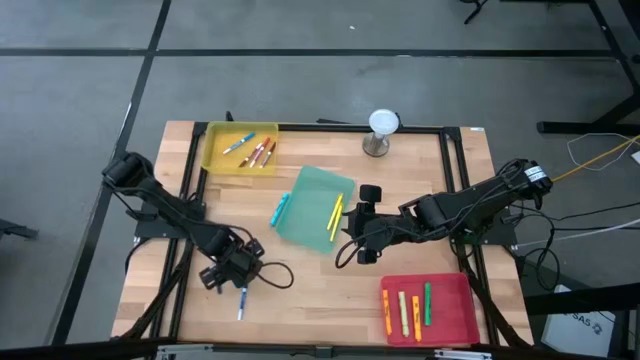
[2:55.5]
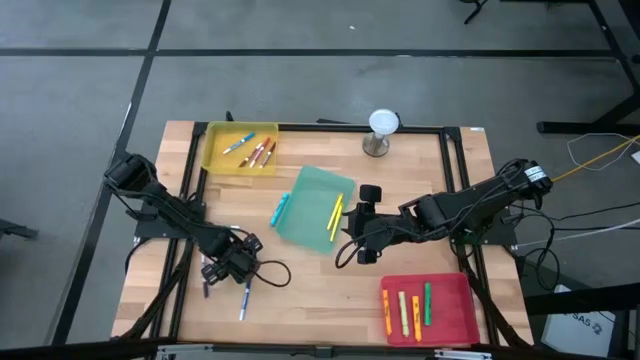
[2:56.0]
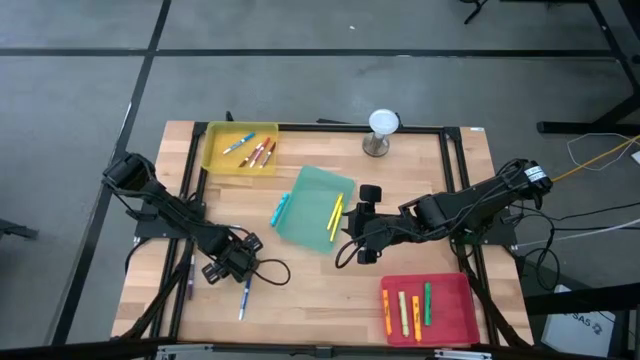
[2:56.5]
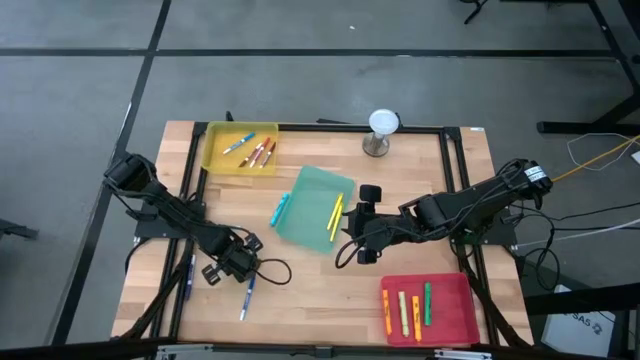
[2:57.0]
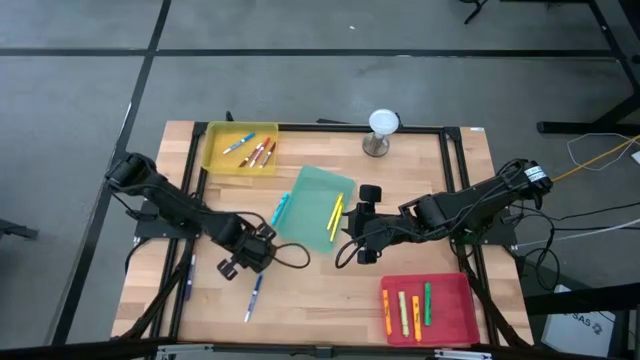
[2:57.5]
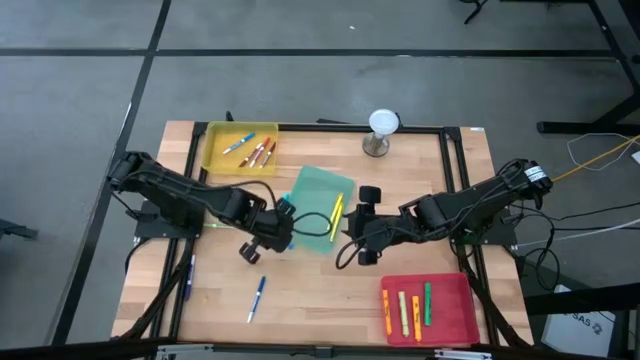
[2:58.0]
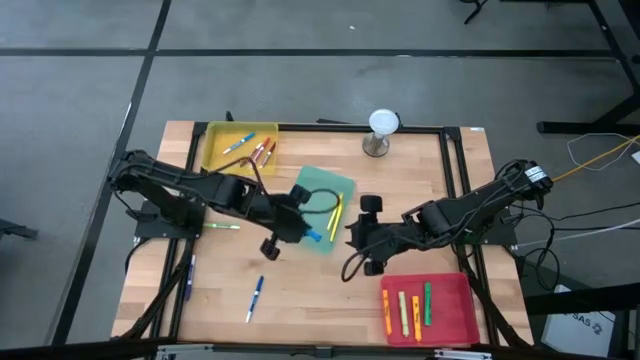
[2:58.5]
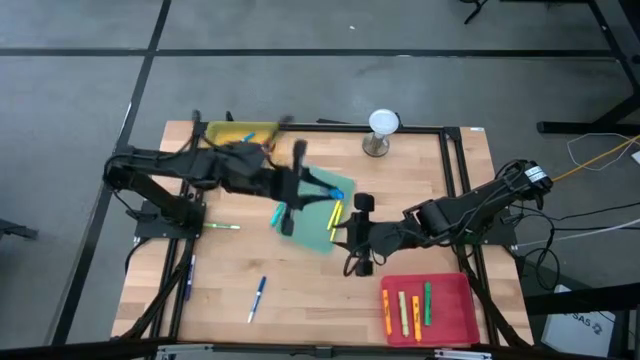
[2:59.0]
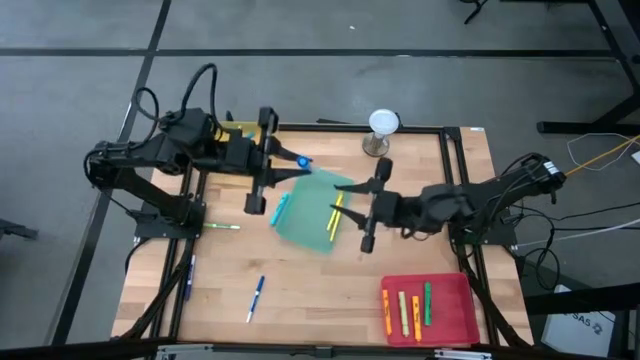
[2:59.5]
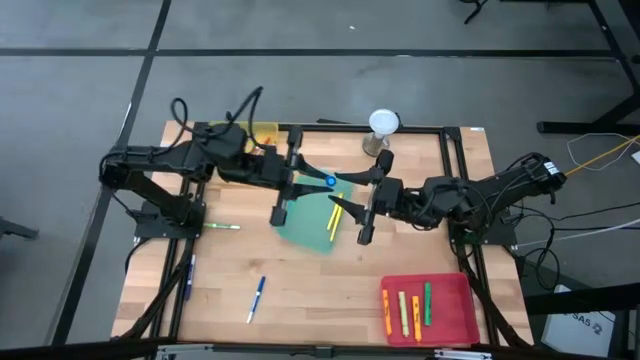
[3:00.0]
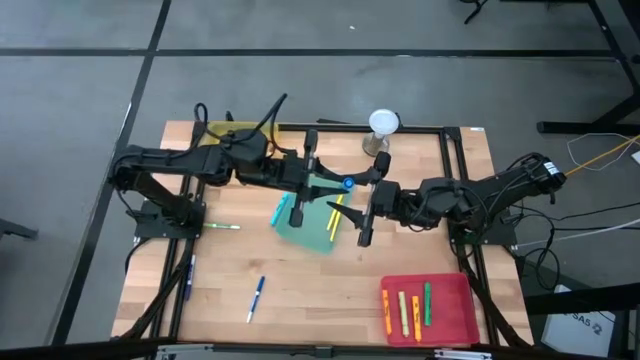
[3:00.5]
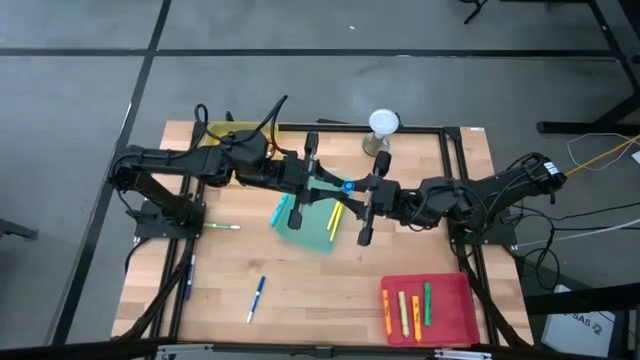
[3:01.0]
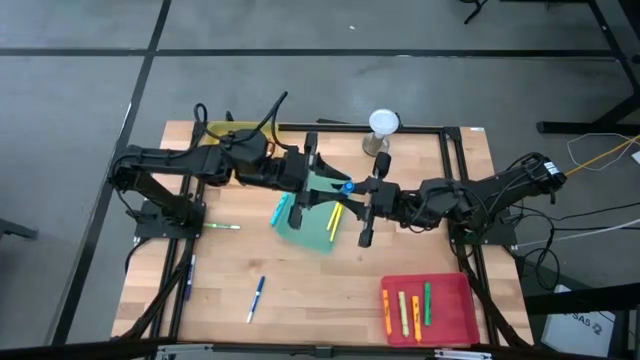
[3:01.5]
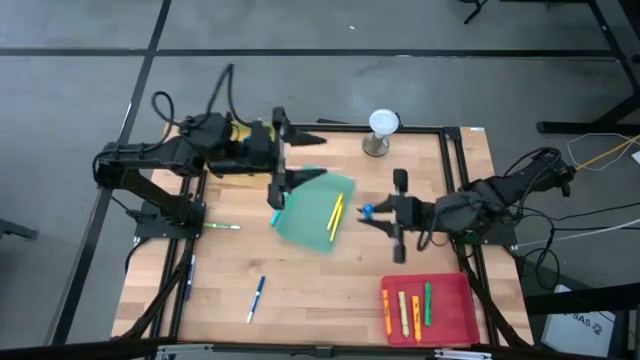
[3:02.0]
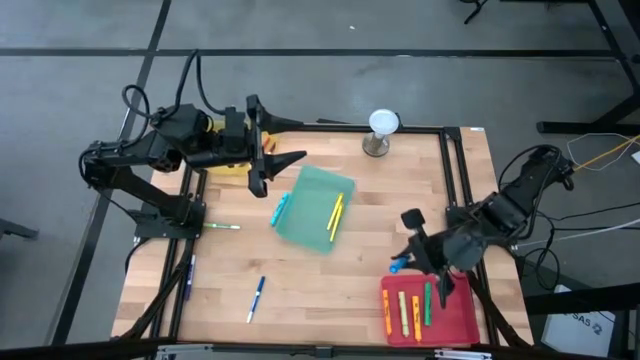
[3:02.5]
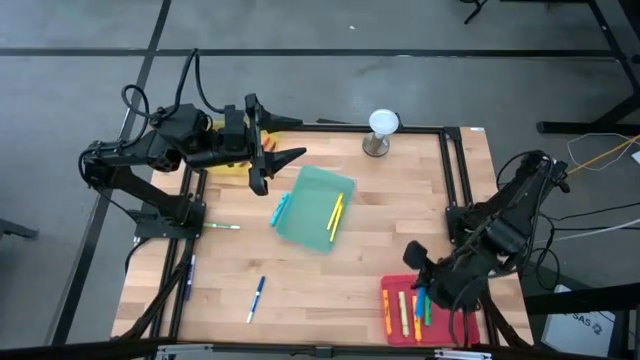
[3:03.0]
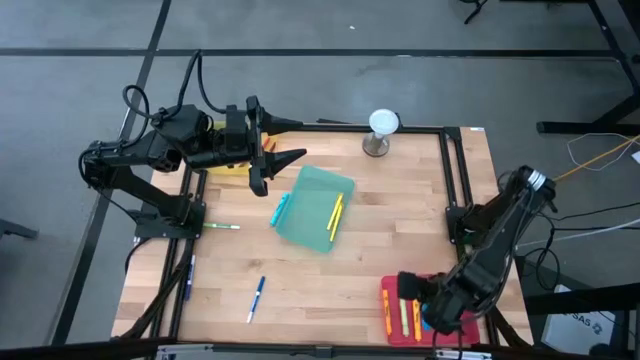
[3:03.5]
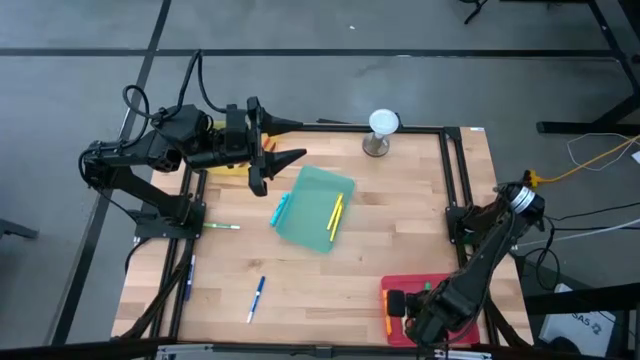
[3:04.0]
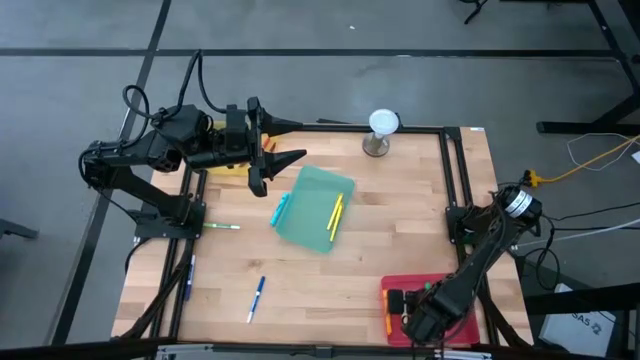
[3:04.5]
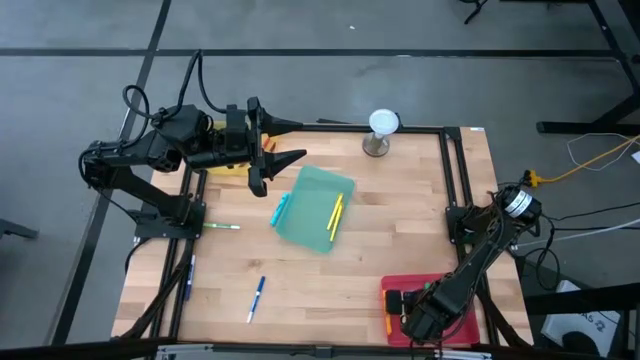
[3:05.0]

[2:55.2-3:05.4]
Task: Pick & Place Markers
Put the blue highlighter pen into the pink bin

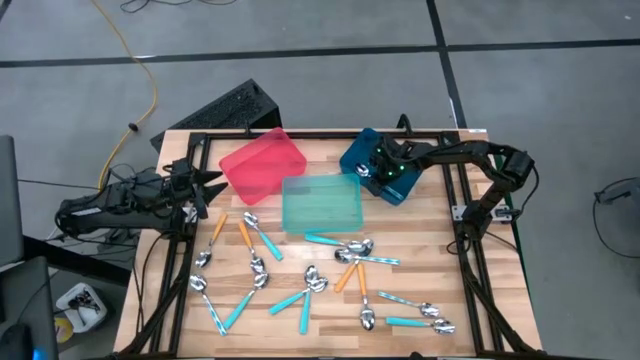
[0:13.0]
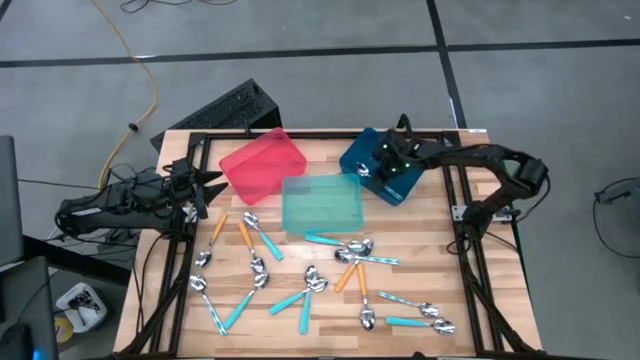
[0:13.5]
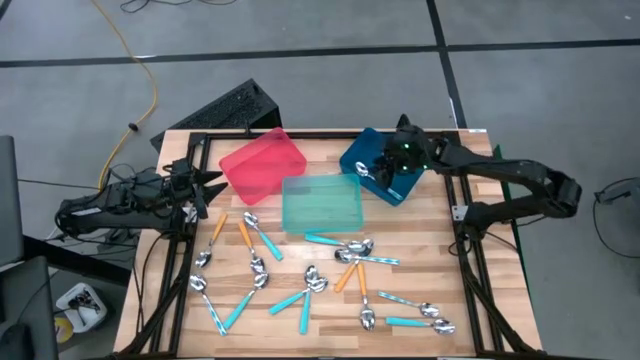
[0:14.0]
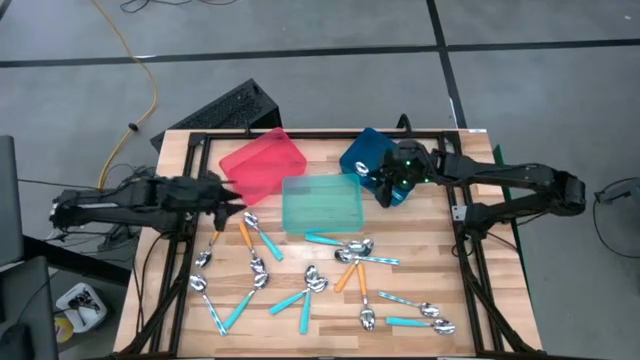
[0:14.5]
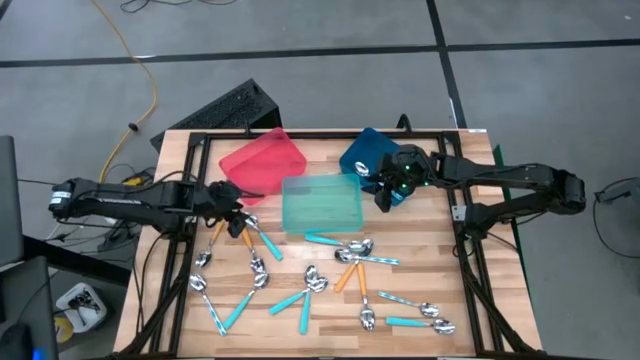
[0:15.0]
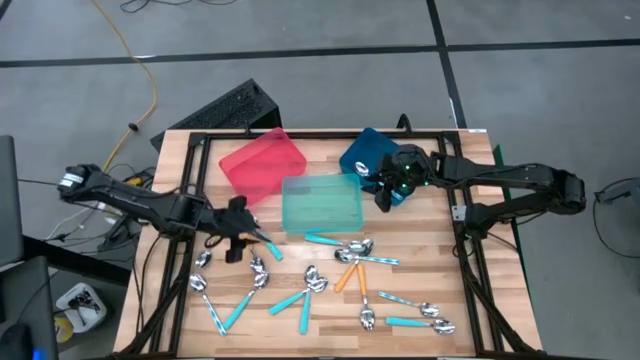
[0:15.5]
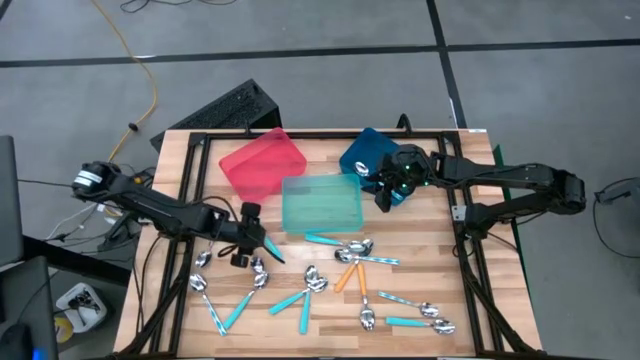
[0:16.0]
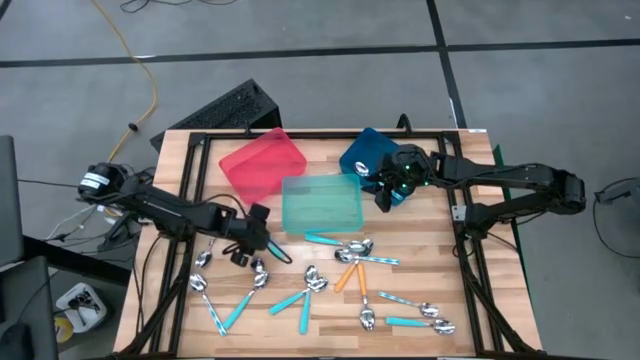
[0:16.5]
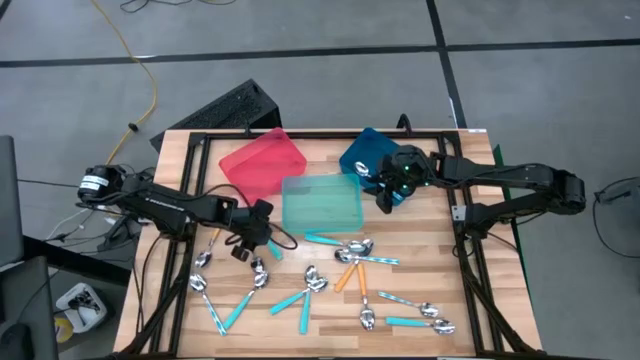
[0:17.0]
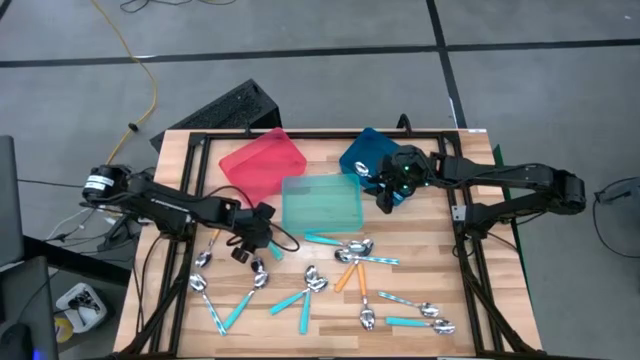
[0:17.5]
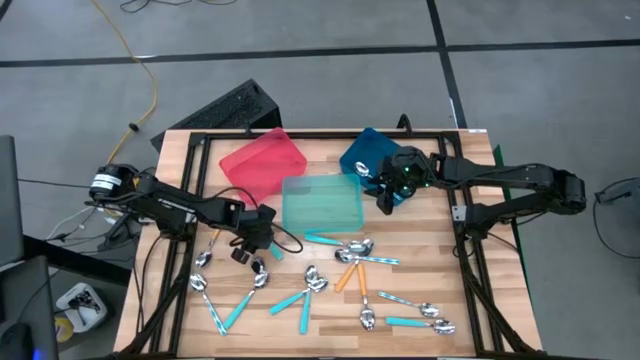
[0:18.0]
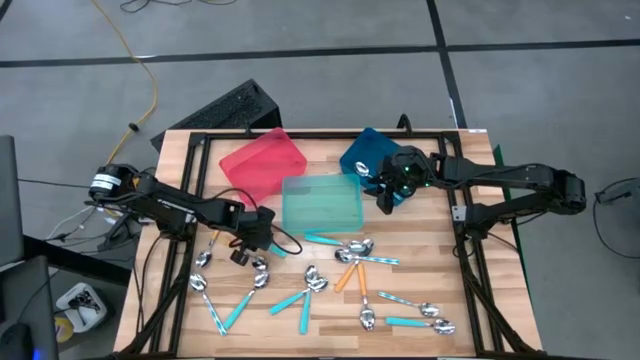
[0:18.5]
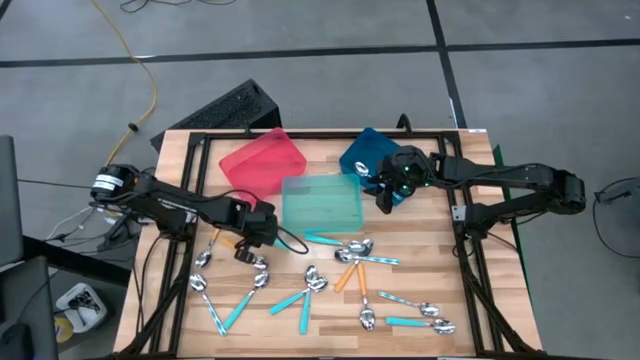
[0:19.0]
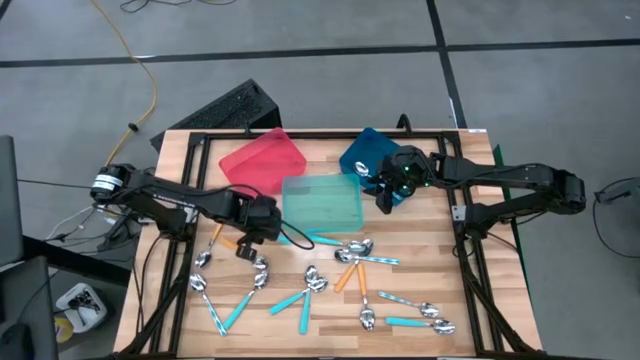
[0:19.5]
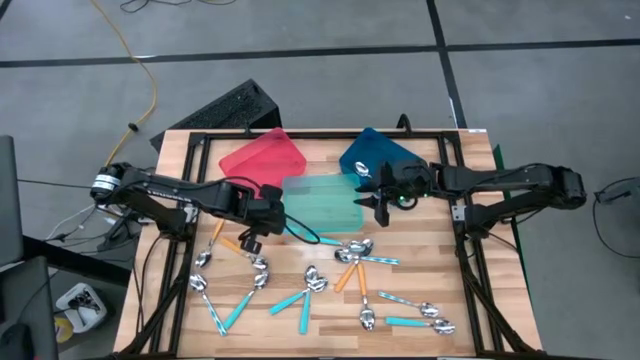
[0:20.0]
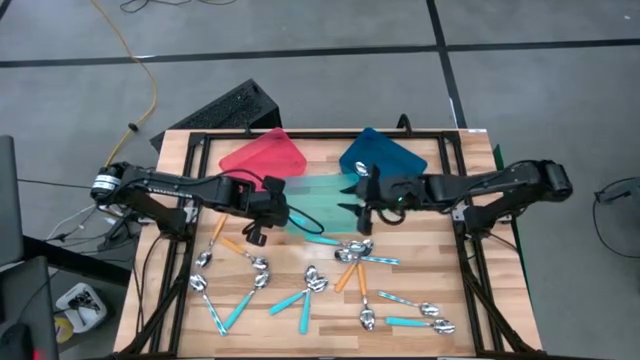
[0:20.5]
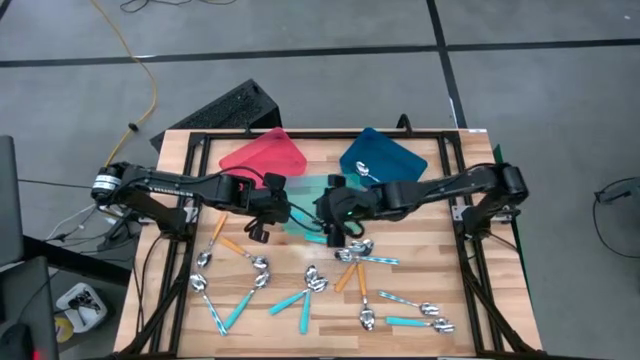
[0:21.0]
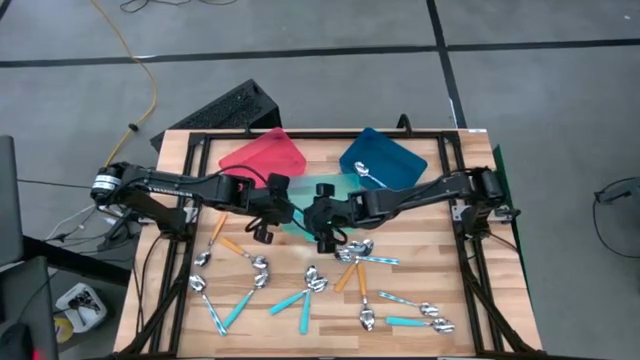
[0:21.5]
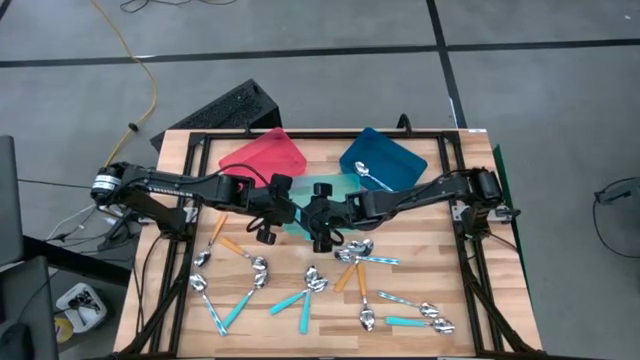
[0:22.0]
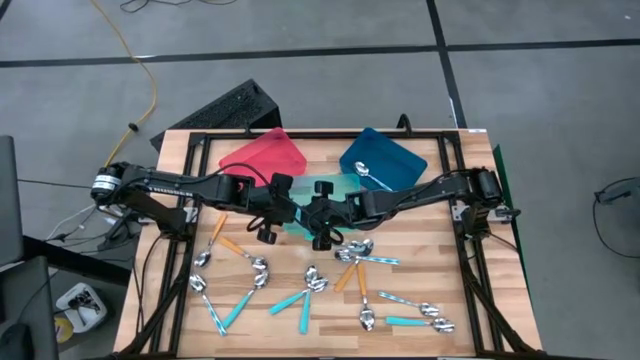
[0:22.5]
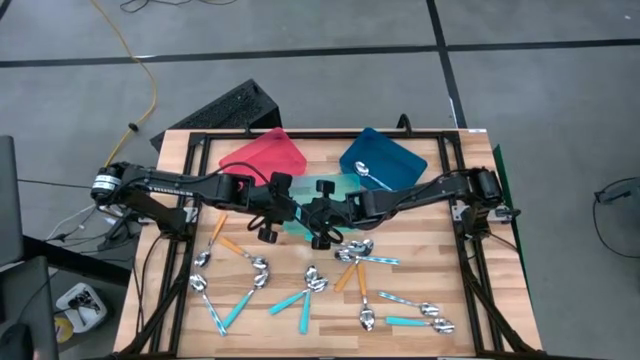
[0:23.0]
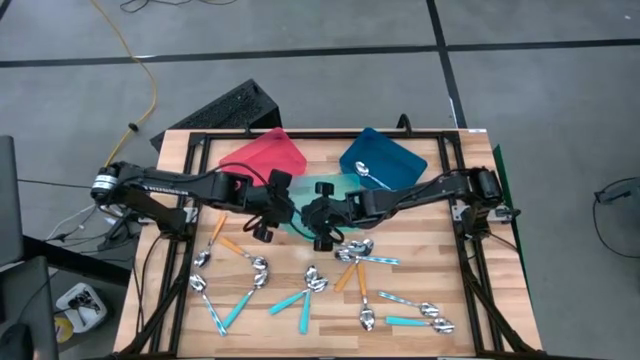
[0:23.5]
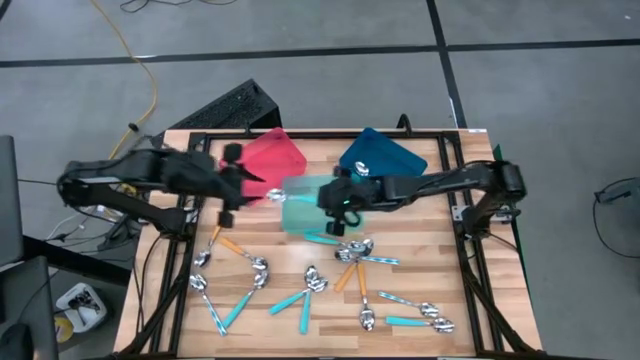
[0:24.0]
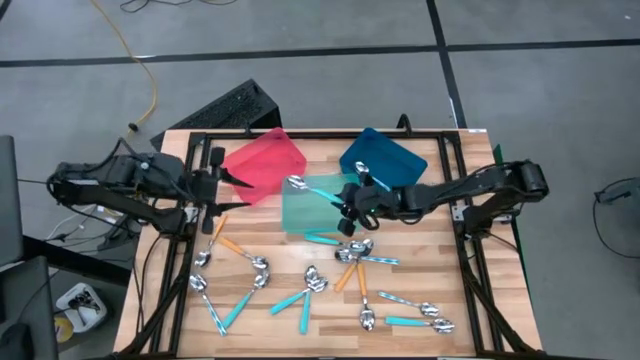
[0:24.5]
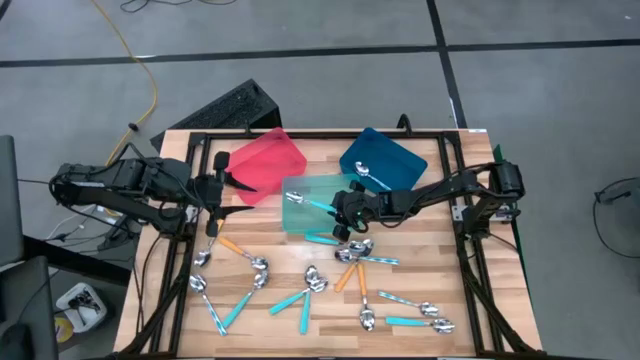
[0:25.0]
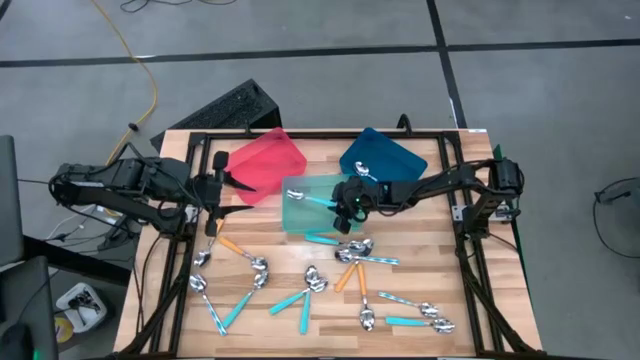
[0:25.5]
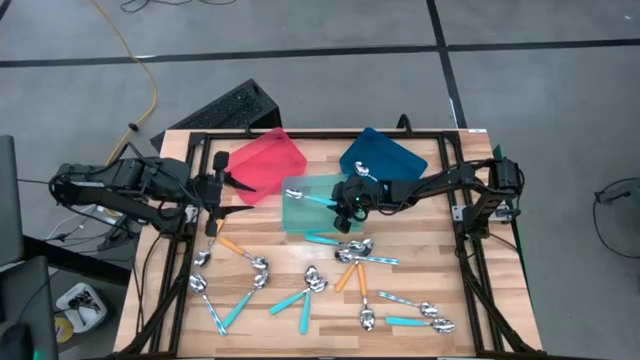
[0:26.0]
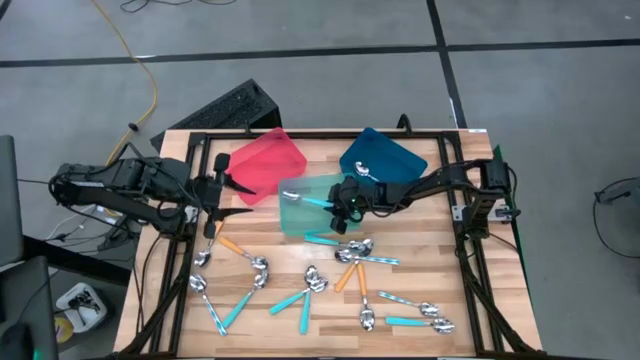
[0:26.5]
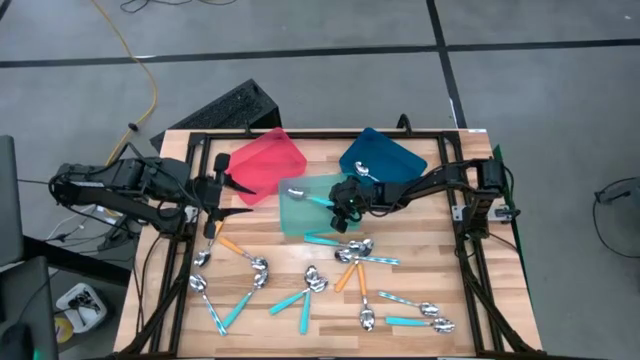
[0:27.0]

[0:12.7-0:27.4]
Task: Sort silverware by color (type)
Put the blue spoon into the green bin
